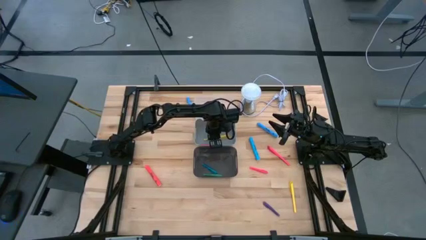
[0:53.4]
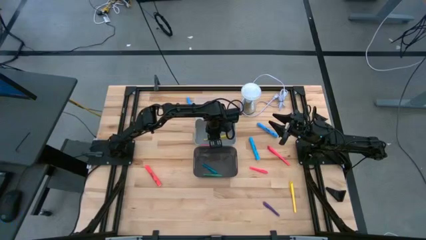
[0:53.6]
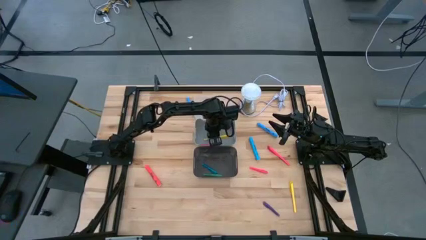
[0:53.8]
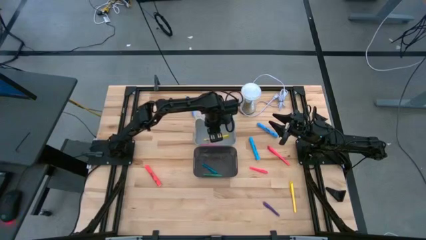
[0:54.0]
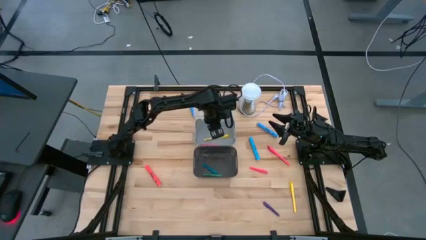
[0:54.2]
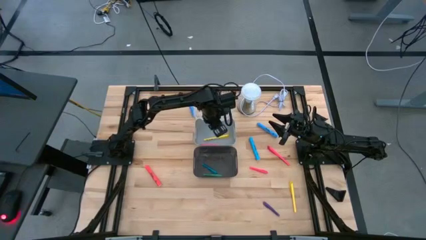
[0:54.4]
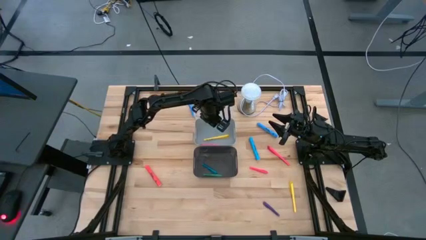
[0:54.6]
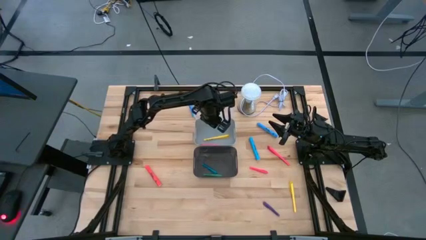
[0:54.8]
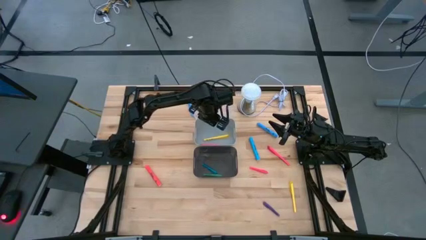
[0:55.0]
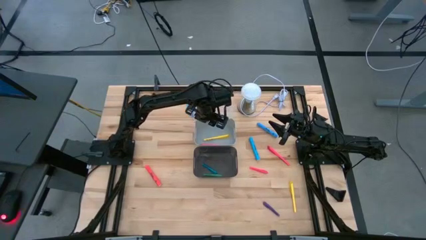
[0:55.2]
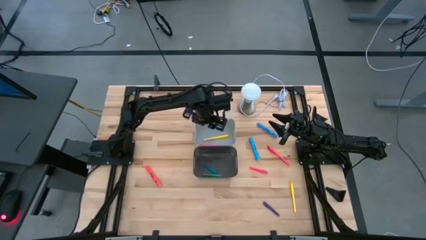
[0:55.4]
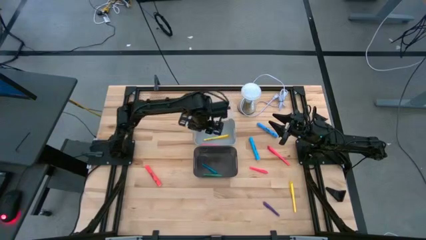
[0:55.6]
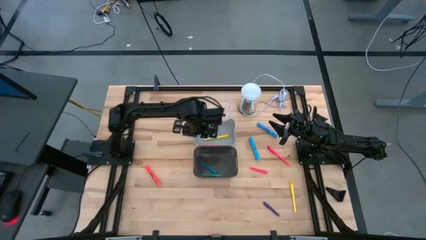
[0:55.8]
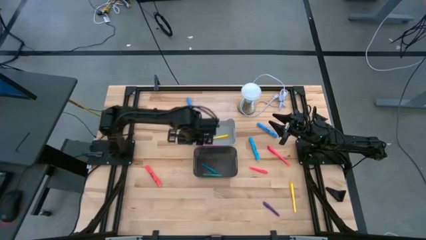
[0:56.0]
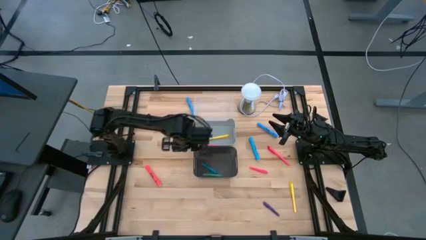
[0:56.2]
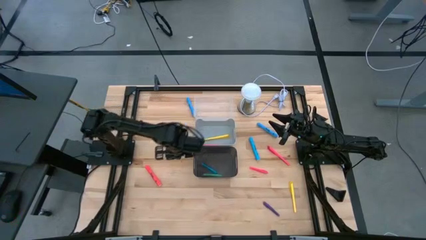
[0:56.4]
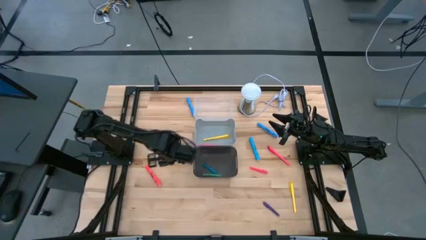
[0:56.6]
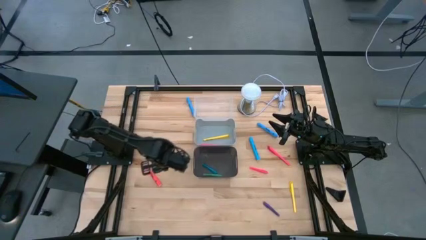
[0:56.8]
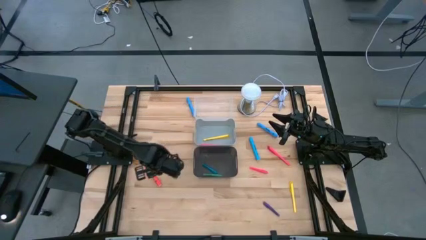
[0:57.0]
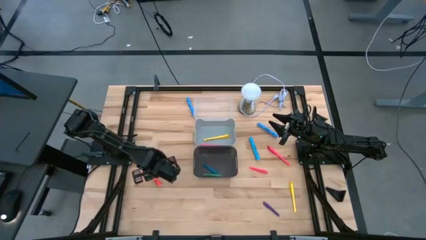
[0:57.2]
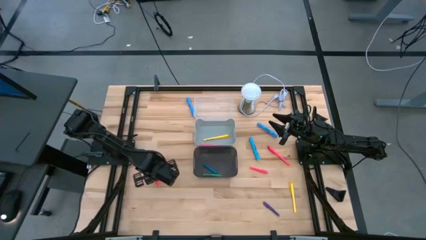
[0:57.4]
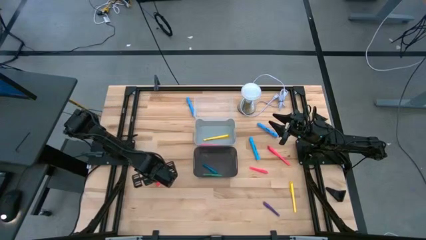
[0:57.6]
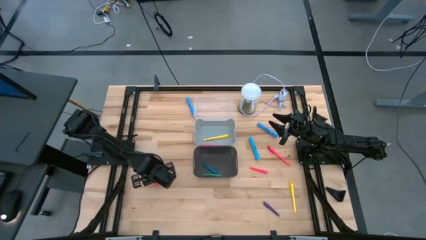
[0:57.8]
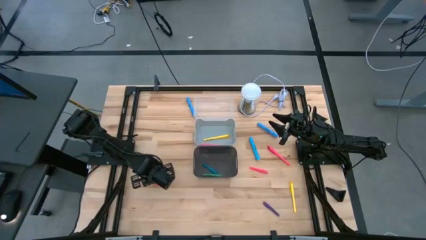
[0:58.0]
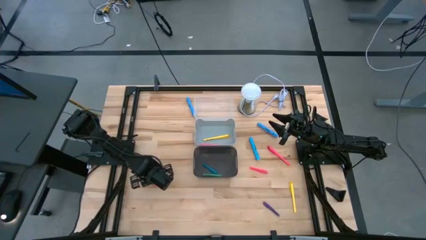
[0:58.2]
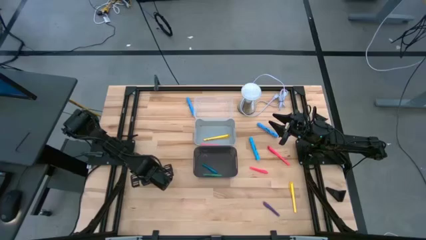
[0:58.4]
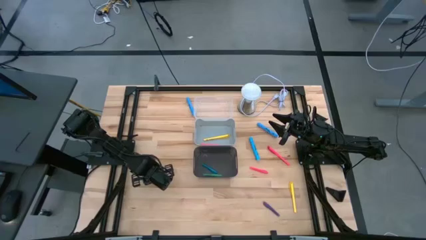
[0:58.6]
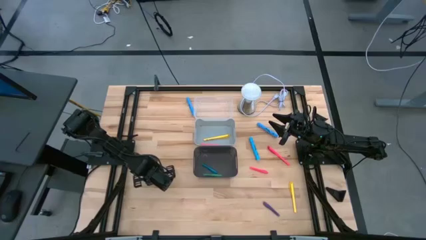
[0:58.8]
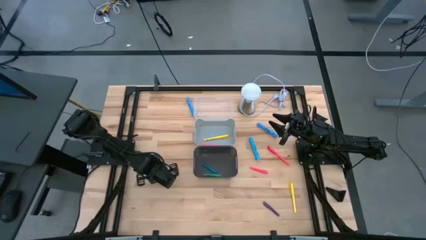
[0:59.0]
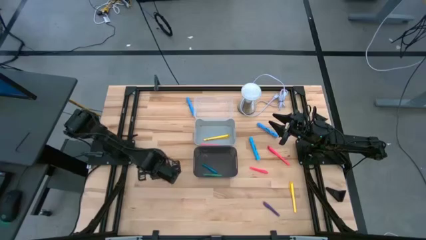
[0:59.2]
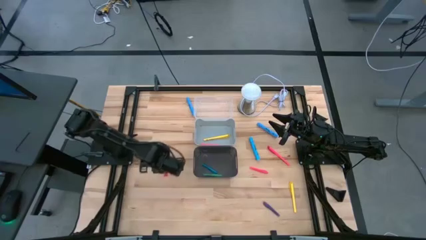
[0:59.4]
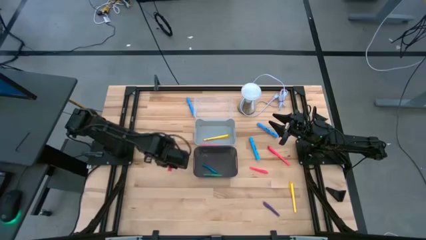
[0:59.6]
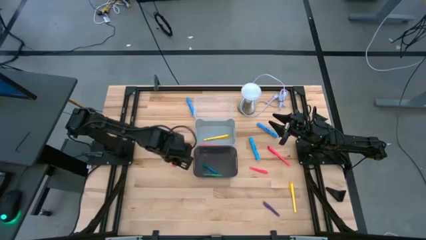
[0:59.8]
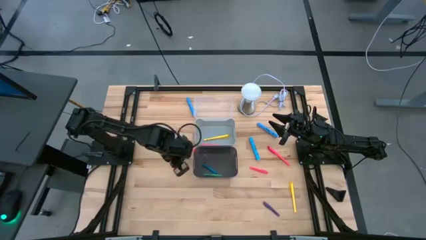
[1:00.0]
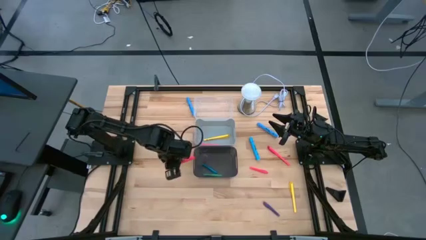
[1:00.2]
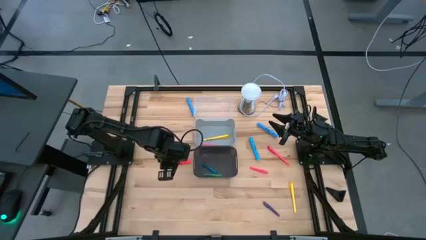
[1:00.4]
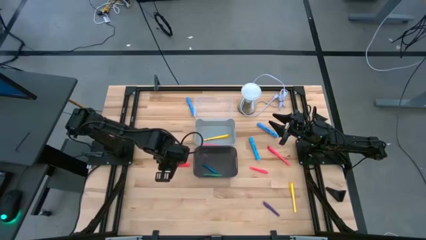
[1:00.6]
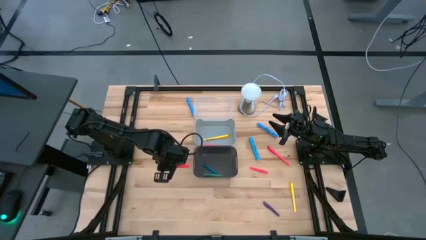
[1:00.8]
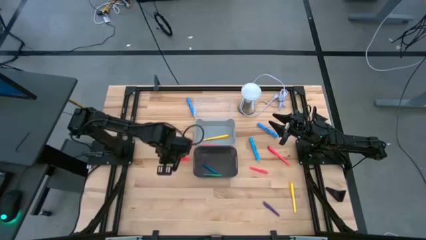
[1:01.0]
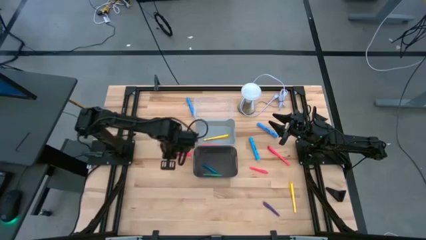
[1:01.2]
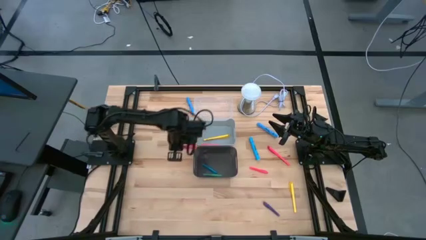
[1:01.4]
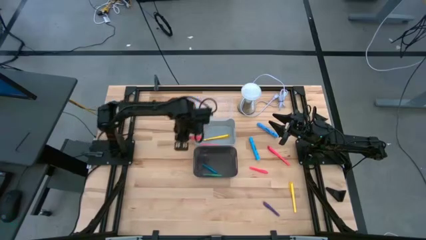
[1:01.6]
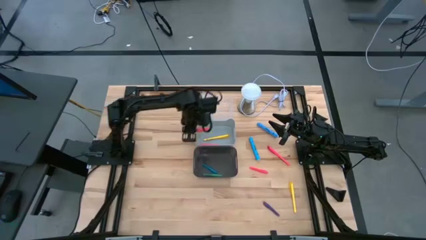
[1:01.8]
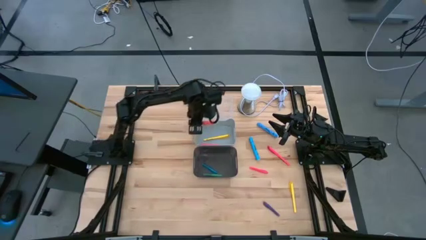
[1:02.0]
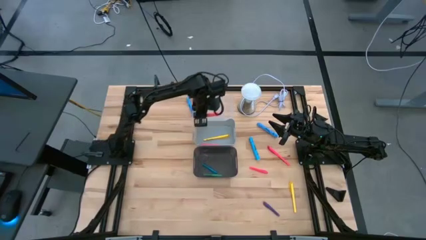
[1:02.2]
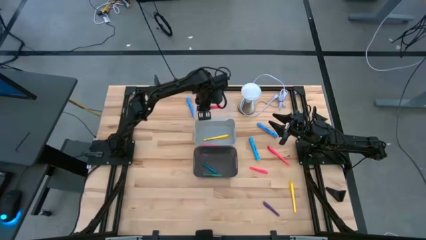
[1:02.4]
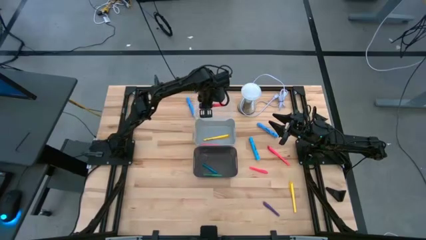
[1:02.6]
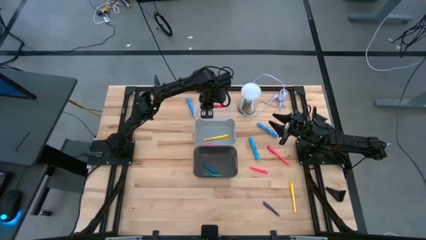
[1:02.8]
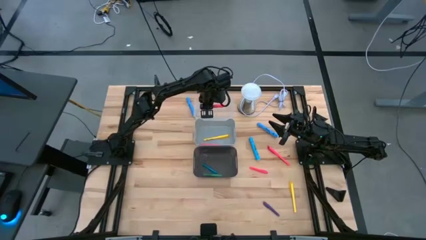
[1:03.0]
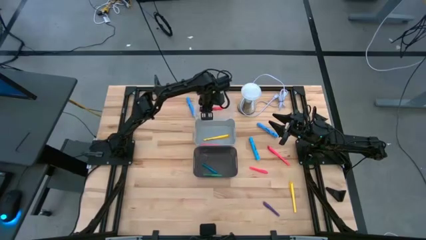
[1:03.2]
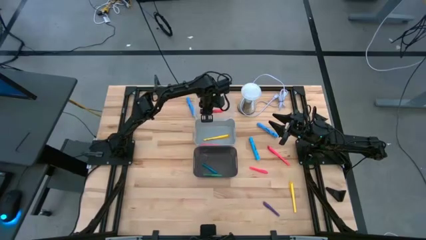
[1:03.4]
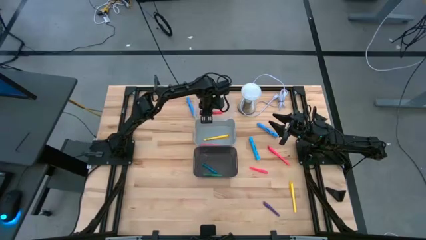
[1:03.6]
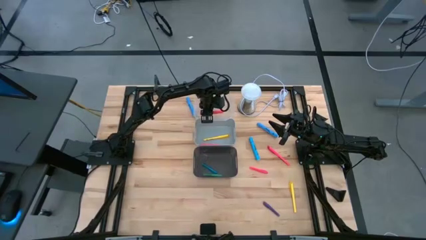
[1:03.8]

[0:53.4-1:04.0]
Task: Pick & Place Markers
Put the neon orange highlighter into the transparent bin

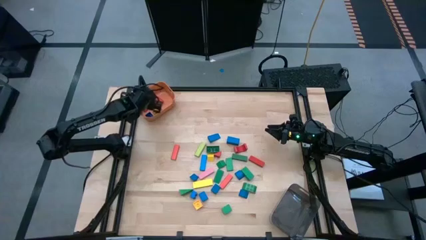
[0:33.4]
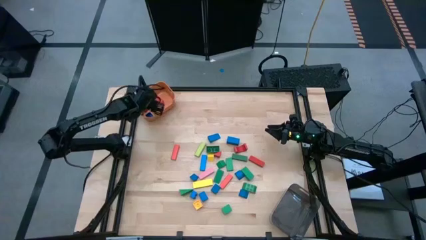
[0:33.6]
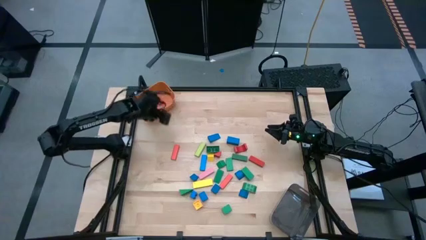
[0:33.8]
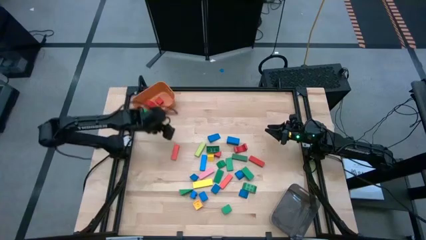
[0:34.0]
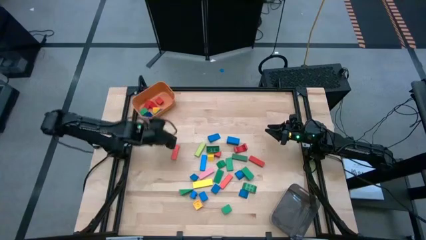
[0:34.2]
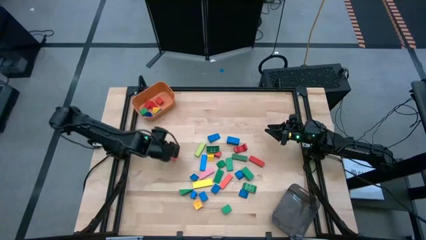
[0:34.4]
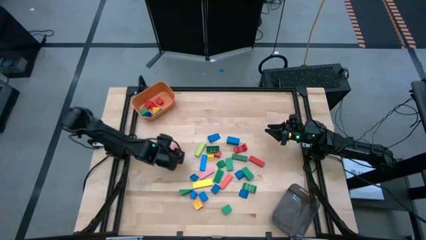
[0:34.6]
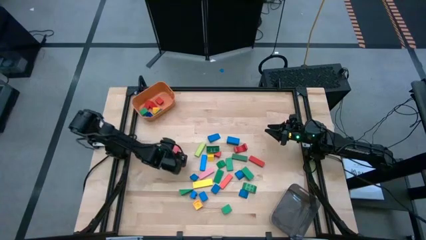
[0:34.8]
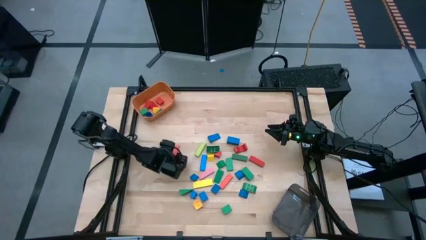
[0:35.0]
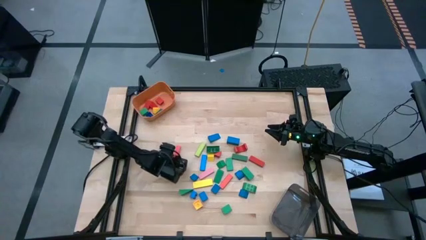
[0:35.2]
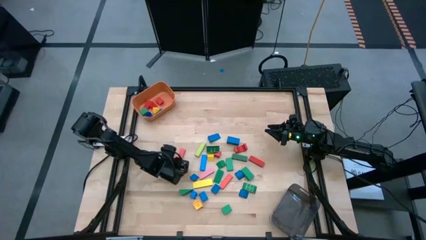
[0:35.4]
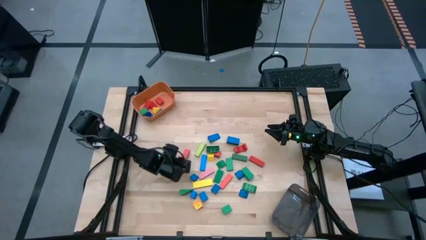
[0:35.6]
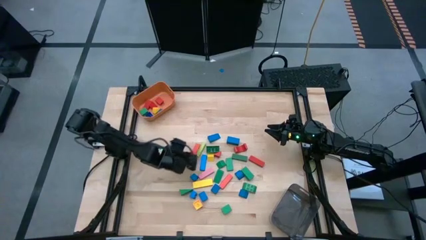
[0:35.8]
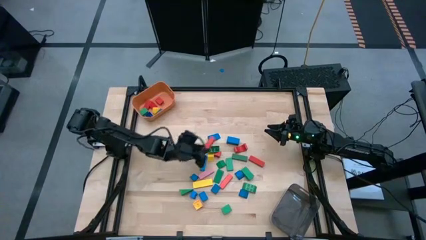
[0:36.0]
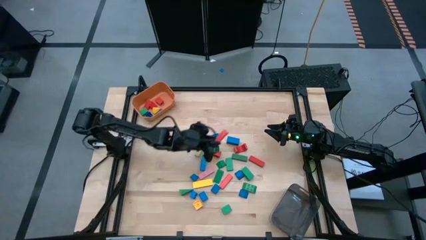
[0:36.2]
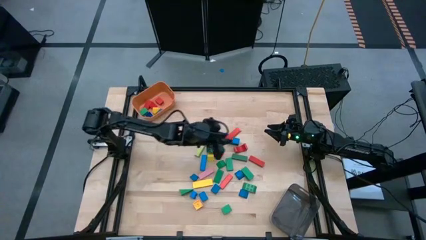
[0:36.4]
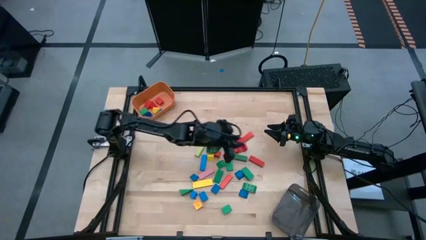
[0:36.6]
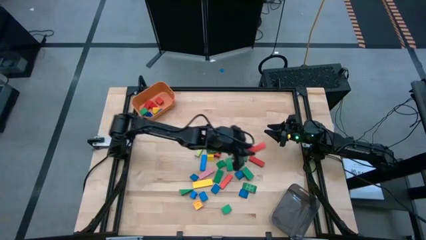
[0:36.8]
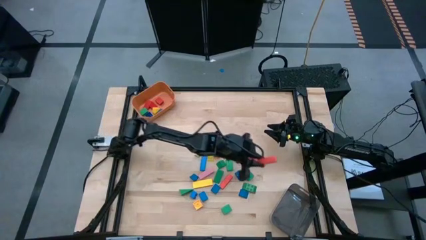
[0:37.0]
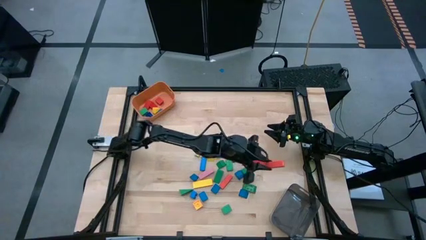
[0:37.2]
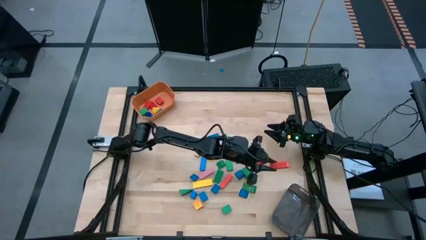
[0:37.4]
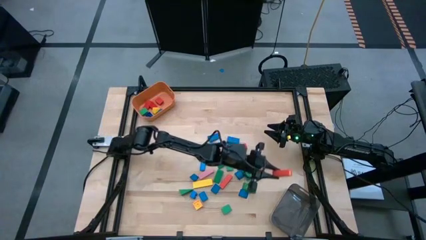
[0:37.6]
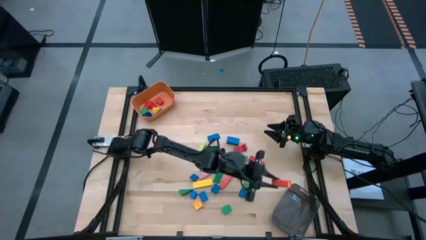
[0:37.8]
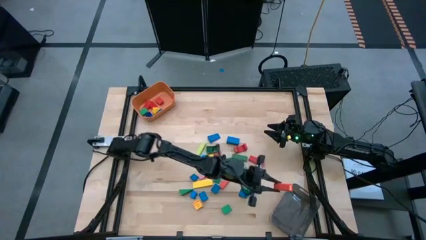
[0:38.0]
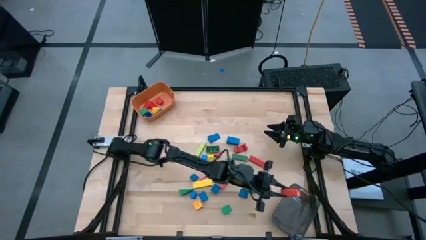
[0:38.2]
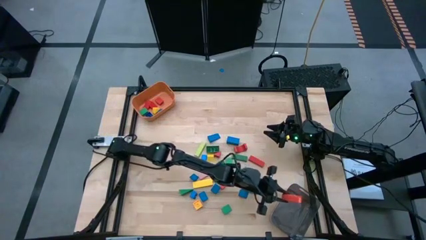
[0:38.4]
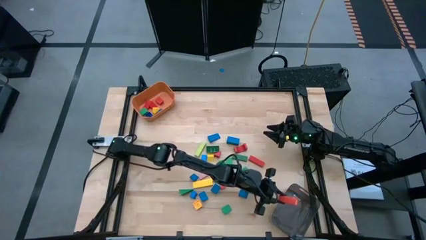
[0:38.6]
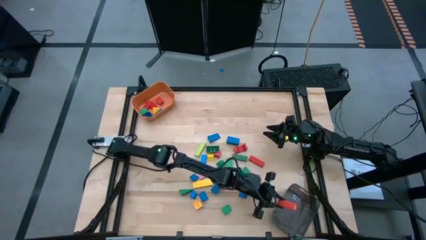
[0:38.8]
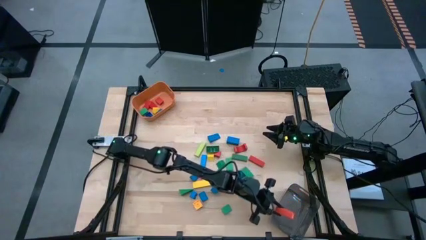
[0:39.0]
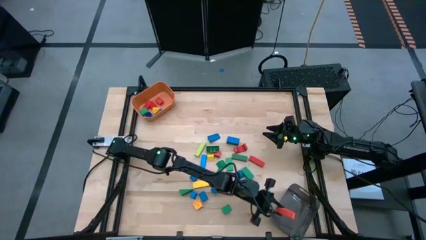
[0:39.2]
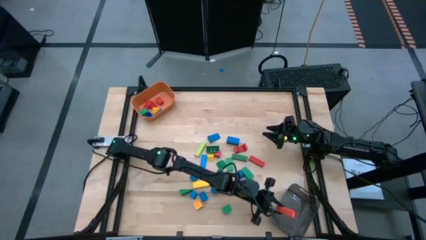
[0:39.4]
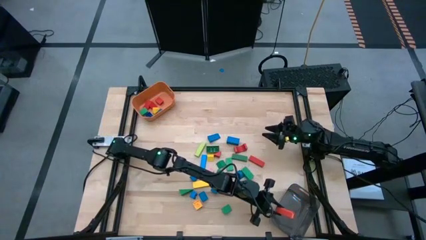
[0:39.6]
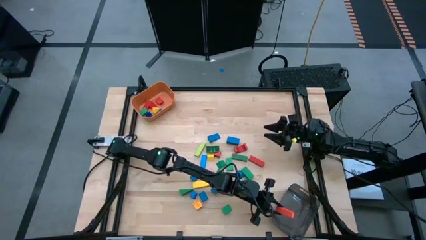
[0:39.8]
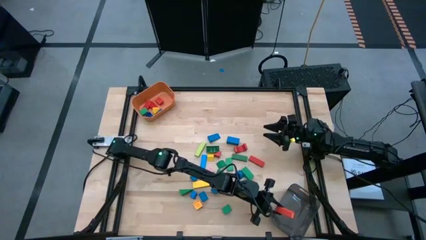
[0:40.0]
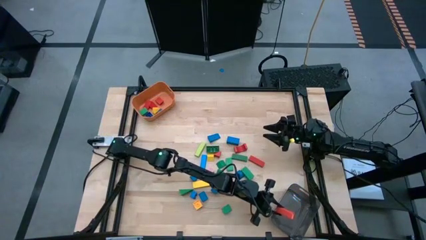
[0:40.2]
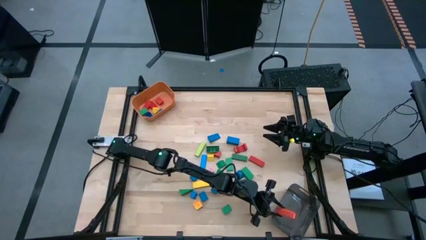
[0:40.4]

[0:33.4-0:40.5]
Task: Sort blocks by size
Put the big orange block into the black bin
